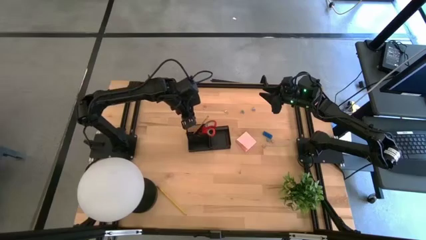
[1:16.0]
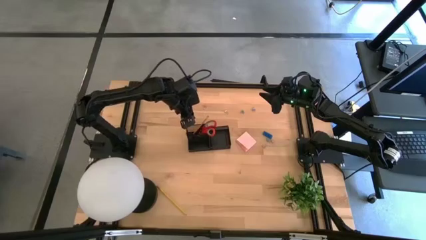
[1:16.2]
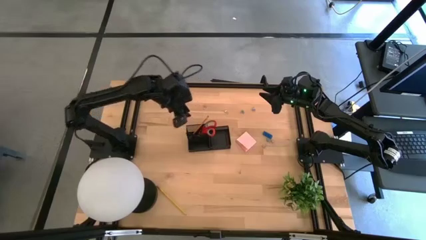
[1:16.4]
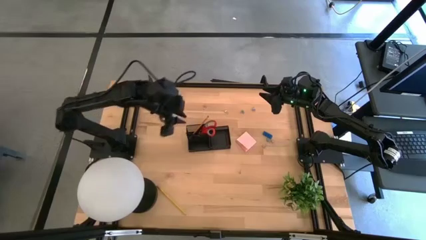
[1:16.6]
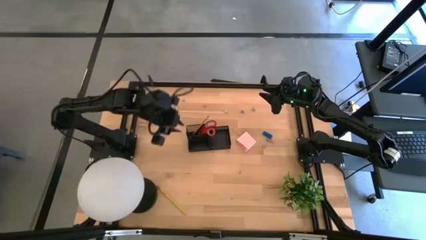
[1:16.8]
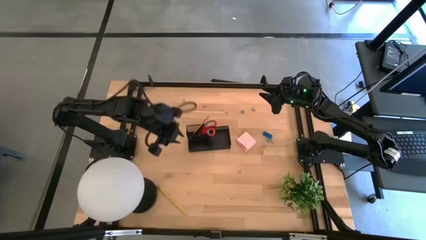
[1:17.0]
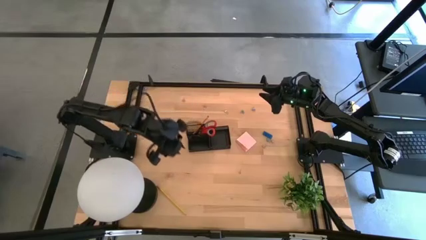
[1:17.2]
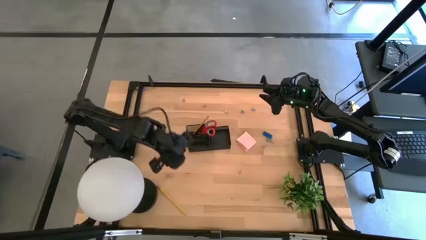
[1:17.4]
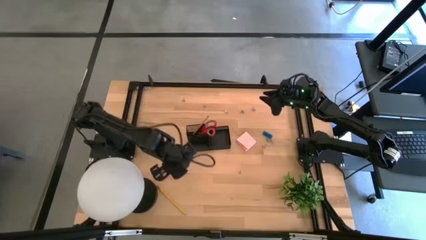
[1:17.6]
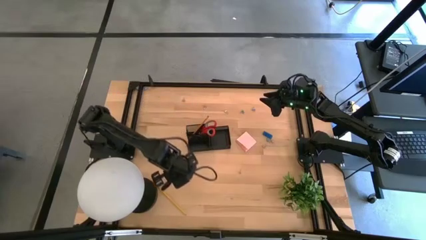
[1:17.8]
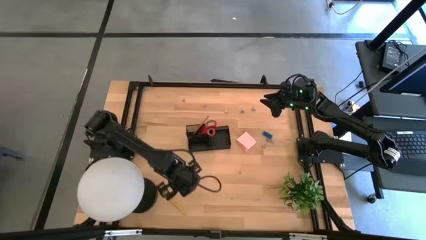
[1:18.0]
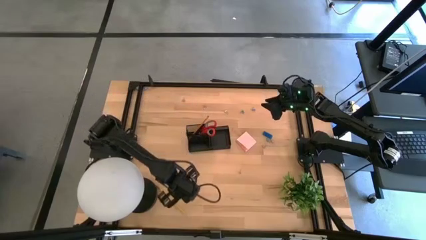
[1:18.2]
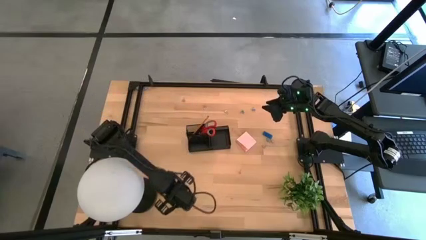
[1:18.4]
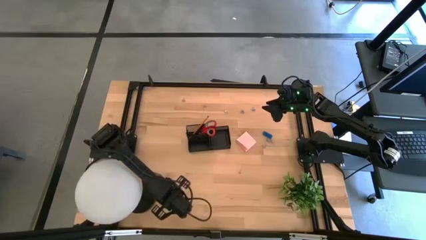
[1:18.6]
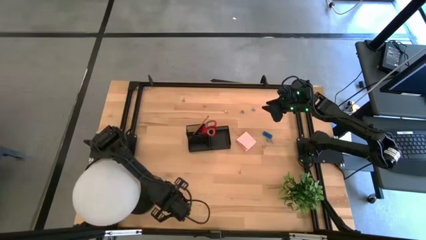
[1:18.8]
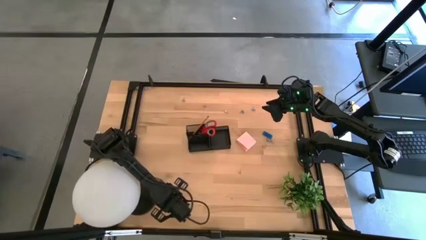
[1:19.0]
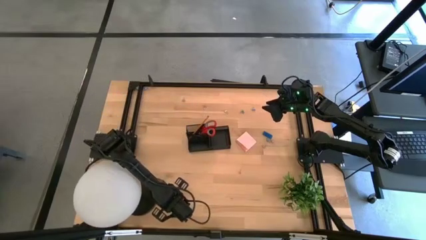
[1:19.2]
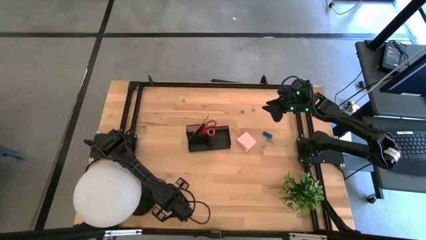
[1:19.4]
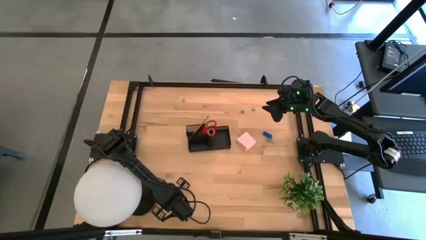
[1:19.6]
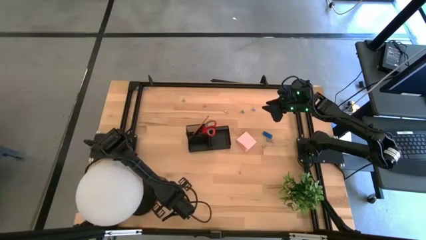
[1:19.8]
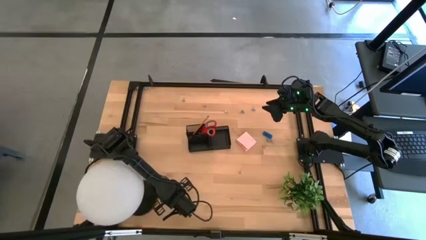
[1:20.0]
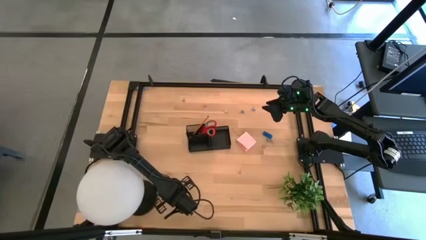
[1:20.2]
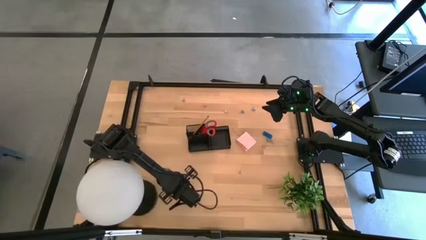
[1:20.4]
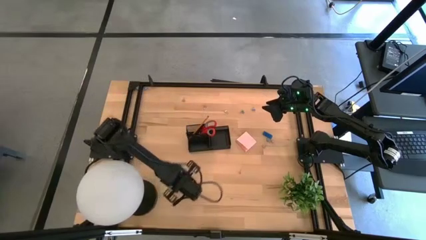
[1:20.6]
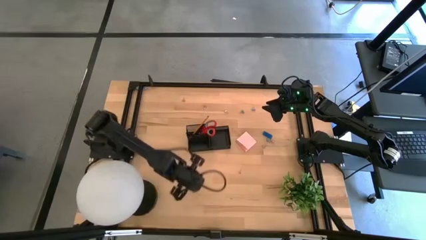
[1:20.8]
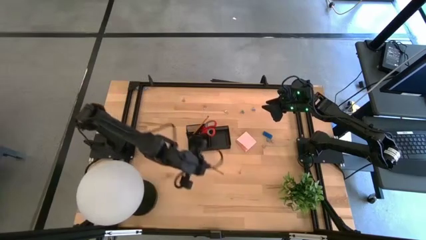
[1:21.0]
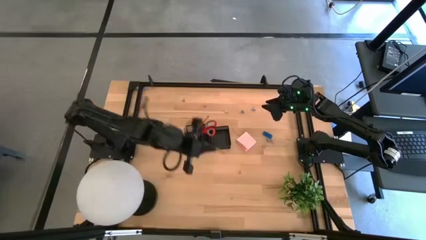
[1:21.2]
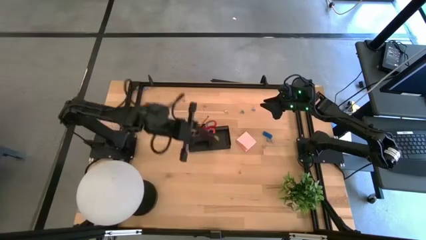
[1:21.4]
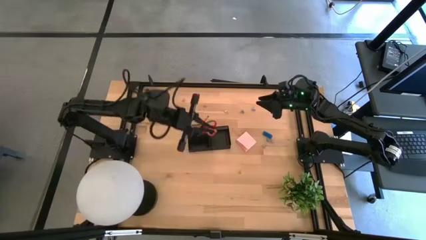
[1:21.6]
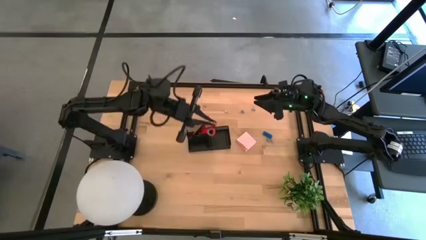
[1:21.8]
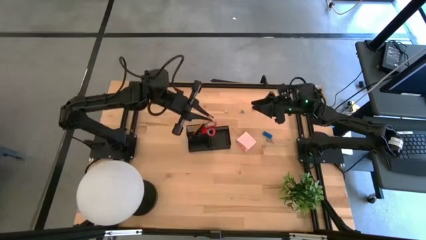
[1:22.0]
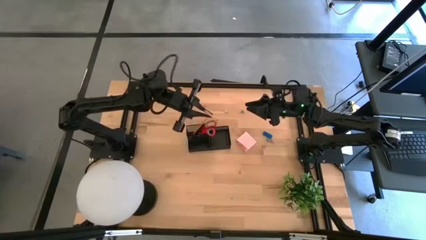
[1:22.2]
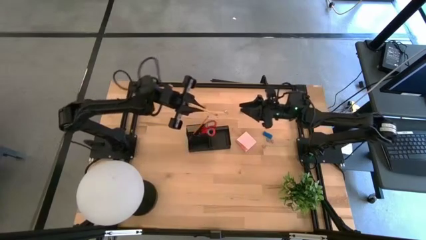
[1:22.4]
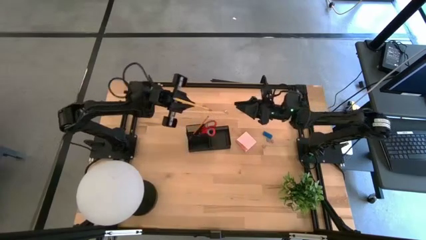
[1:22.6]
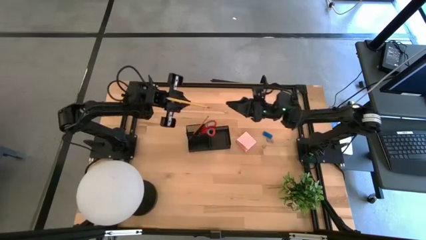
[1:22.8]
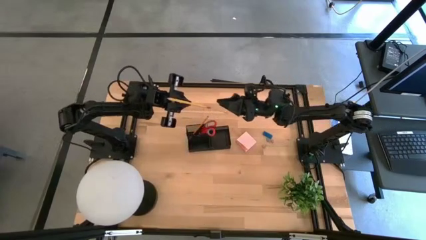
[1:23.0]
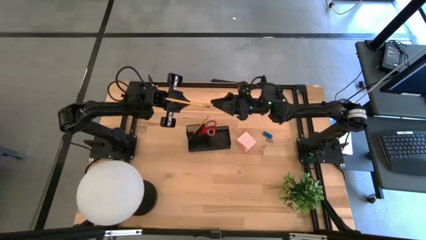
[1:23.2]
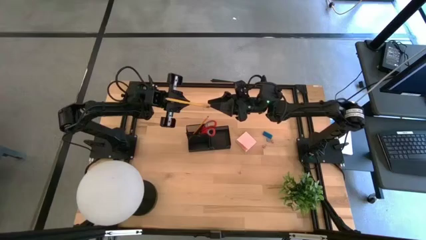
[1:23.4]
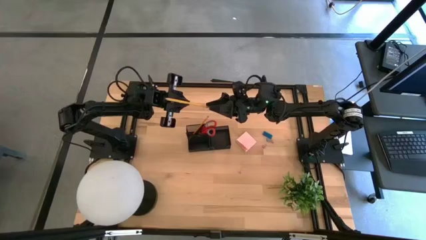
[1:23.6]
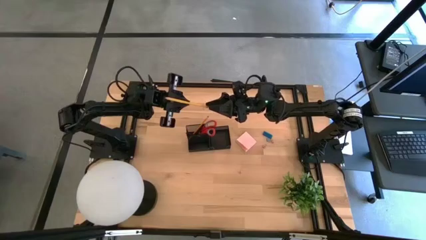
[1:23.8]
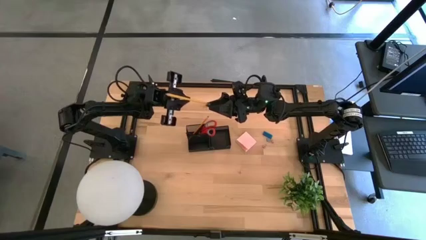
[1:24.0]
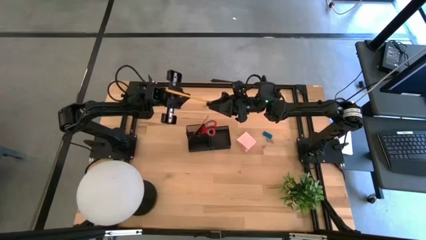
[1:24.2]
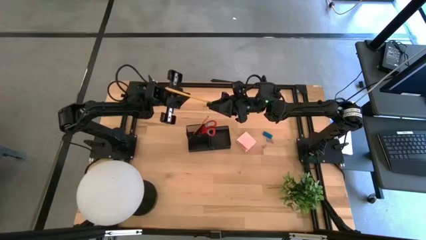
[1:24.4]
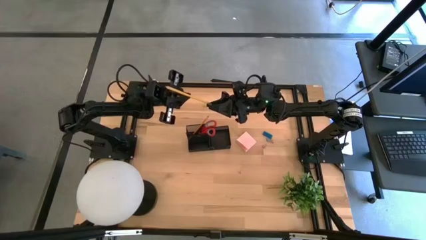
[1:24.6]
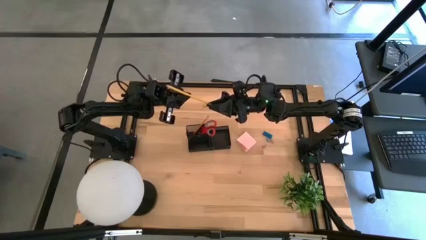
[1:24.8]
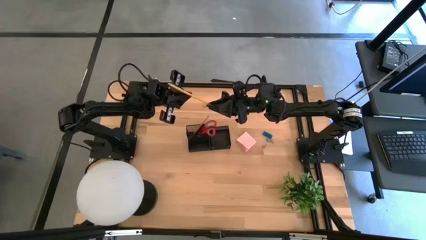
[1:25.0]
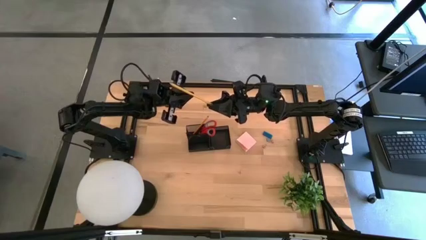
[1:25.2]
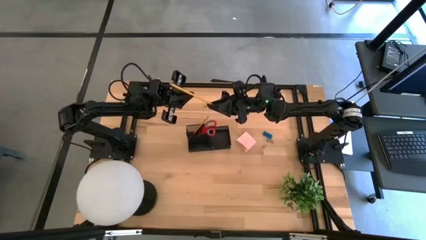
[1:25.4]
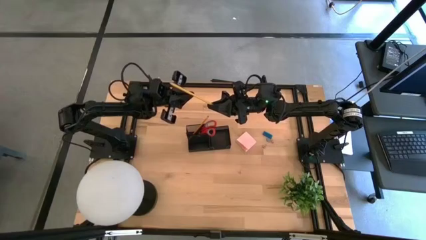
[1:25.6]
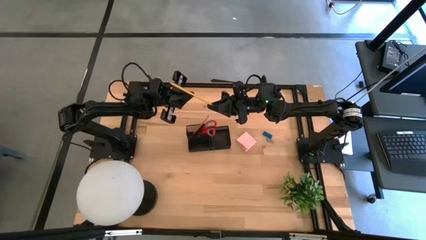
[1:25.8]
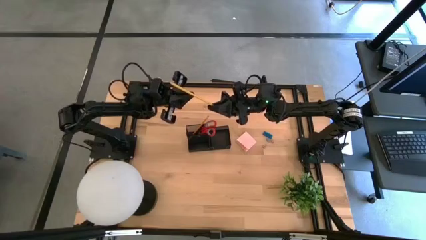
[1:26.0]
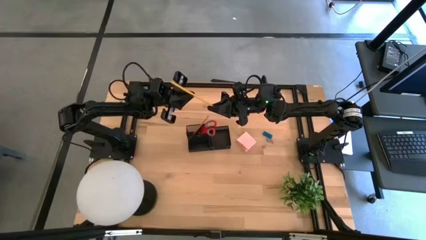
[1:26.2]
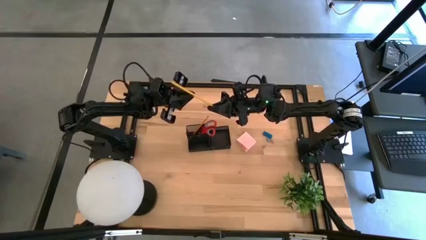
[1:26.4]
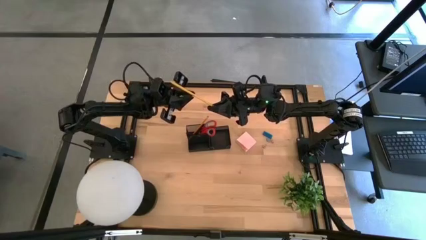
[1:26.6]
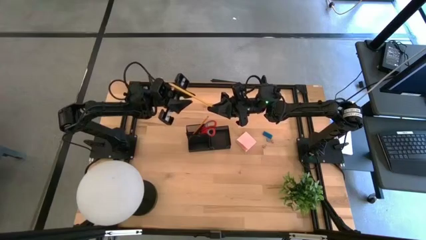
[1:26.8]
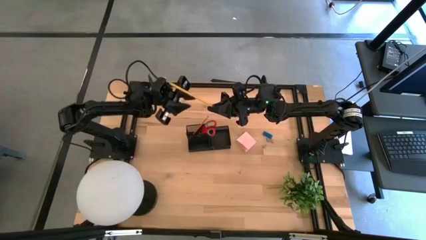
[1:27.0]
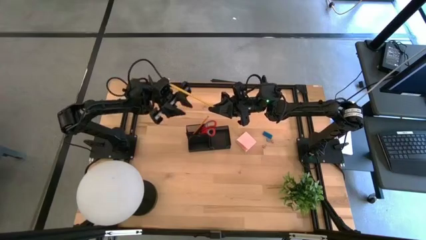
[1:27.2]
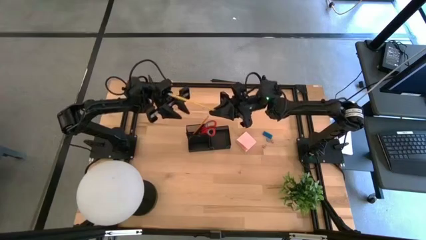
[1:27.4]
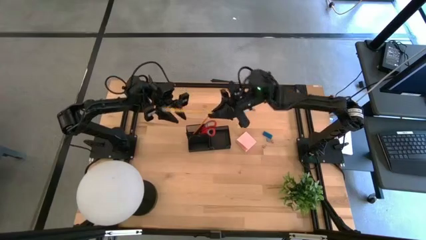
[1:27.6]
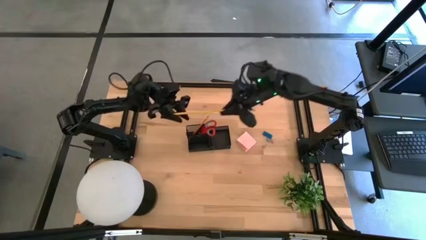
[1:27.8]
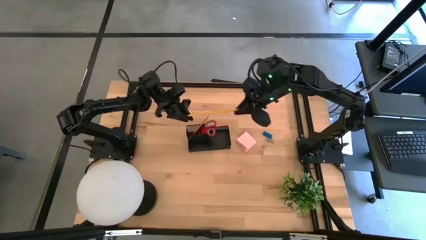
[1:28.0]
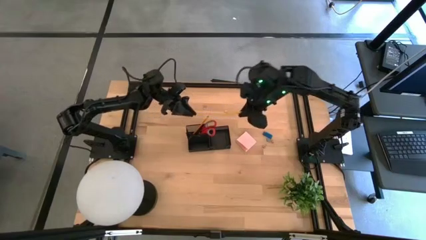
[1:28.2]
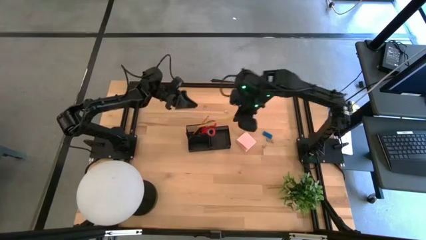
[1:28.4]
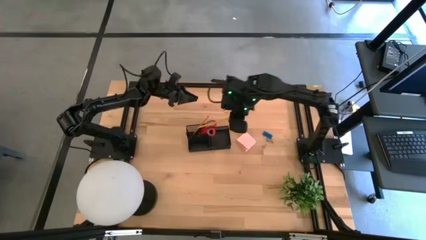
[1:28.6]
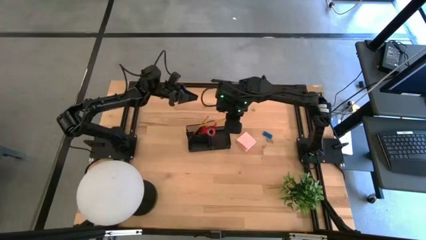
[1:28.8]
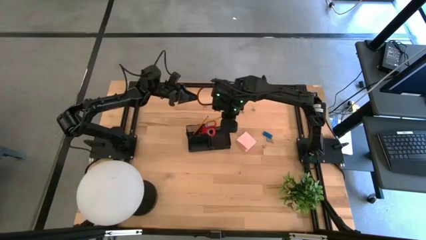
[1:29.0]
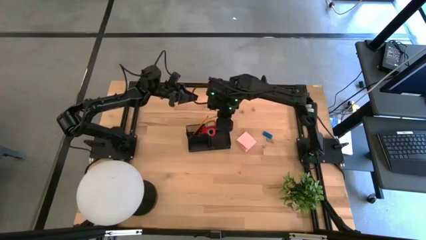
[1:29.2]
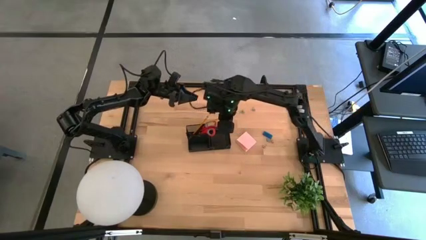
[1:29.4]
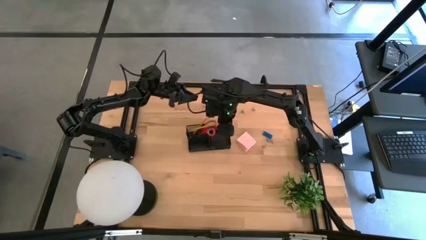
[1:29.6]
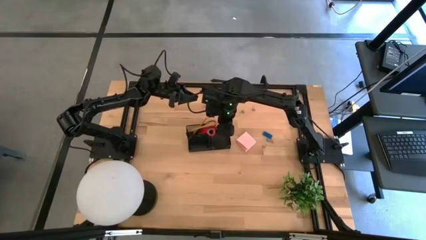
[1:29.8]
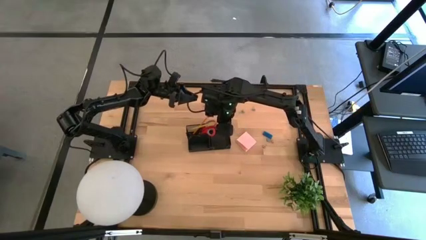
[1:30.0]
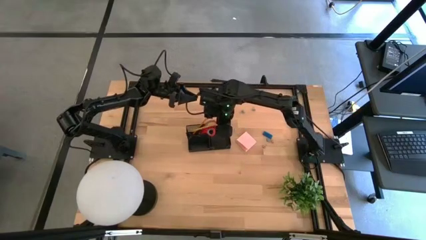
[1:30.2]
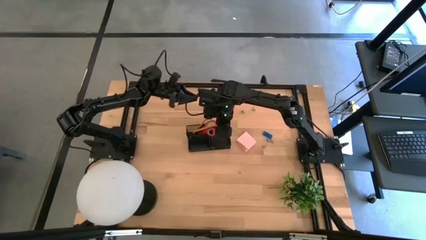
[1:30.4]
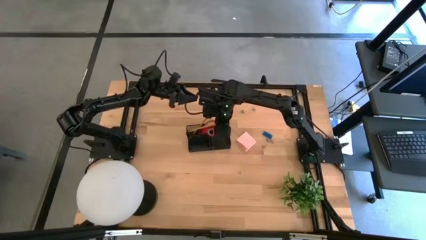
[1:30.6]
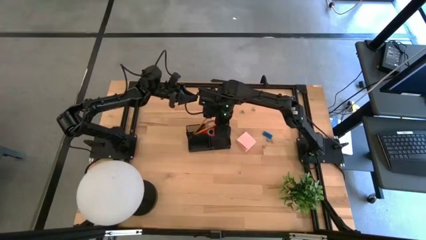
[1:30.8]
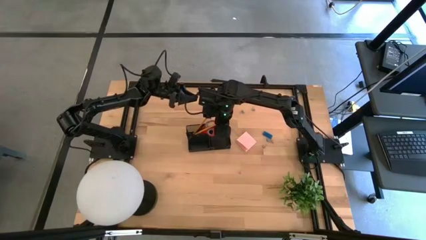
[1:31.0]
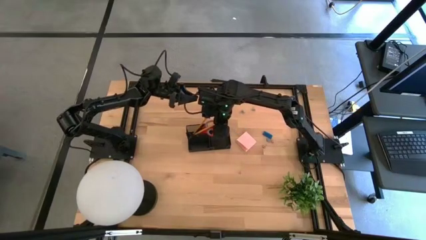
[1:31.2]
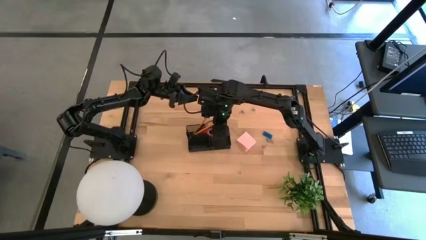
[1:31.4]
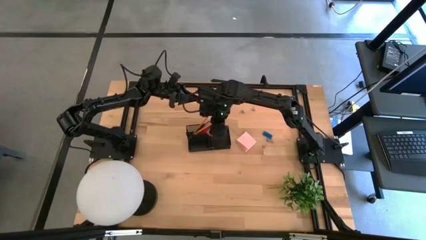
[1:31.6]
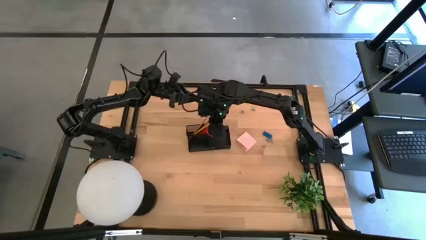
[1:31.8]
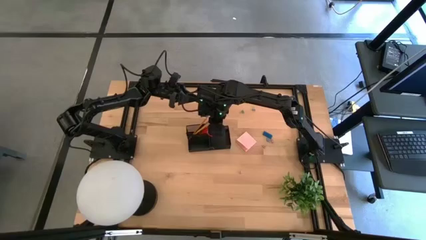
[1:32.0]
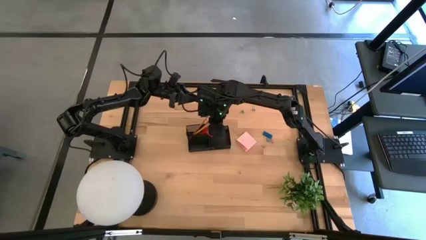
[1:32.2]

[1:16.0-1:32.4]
Task: Pick and place office supplies into organizer
Put the yellow pencil into the desk organizer
